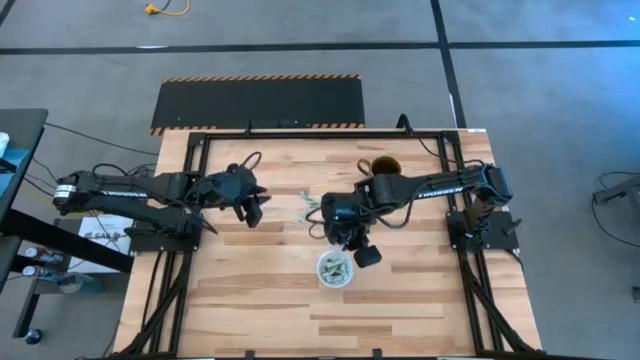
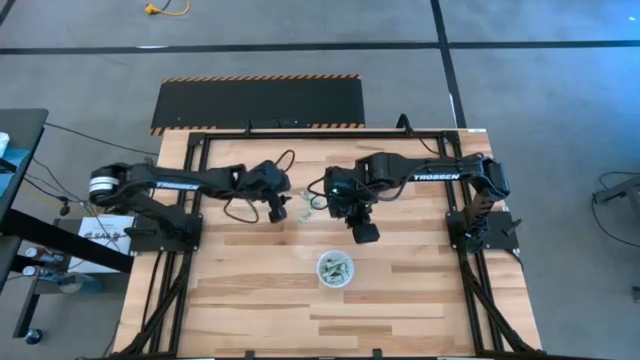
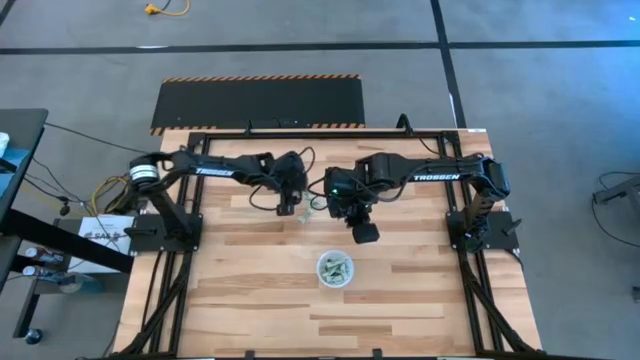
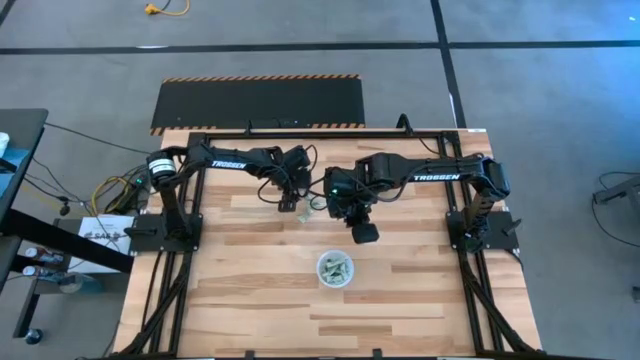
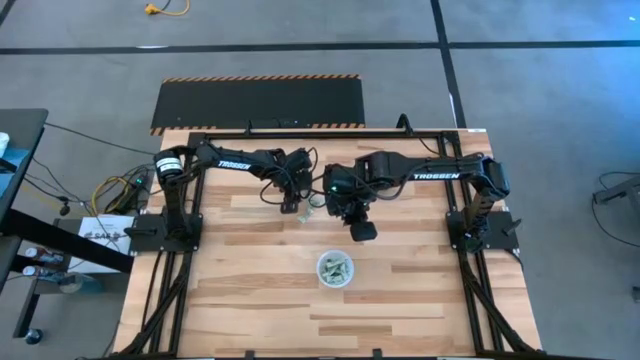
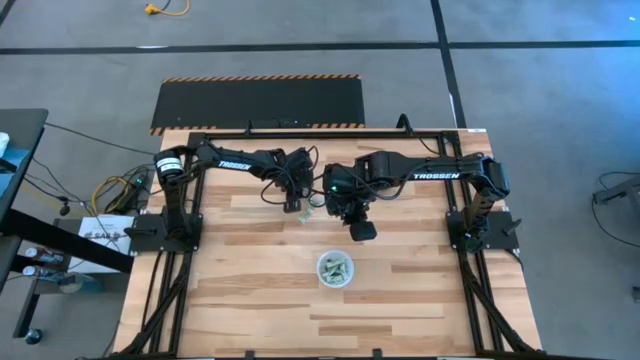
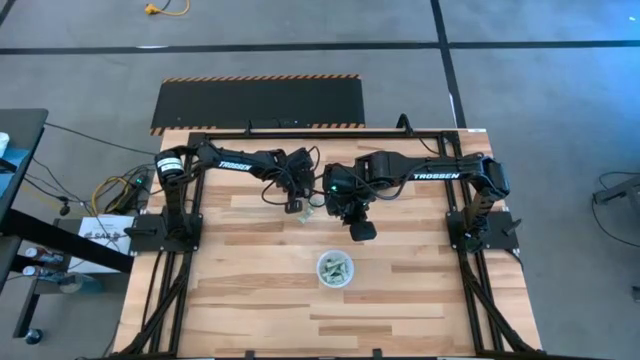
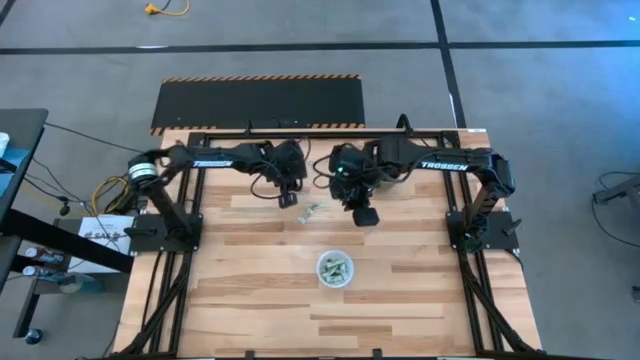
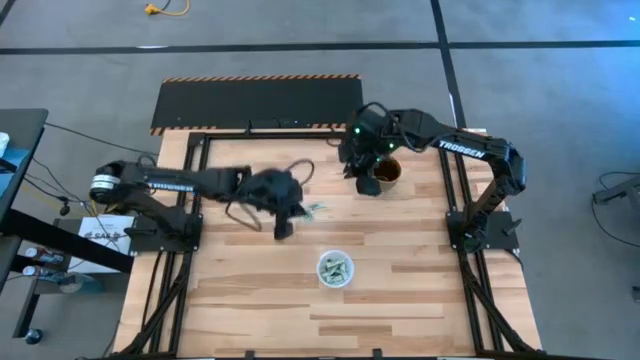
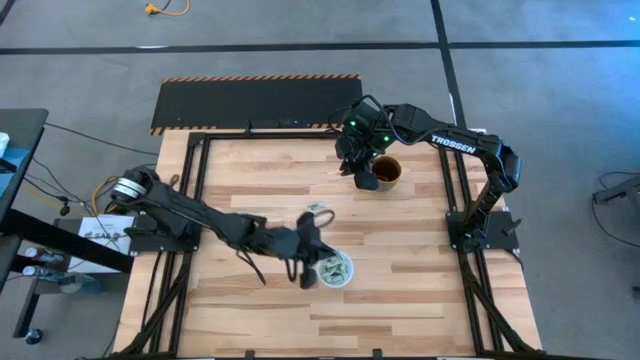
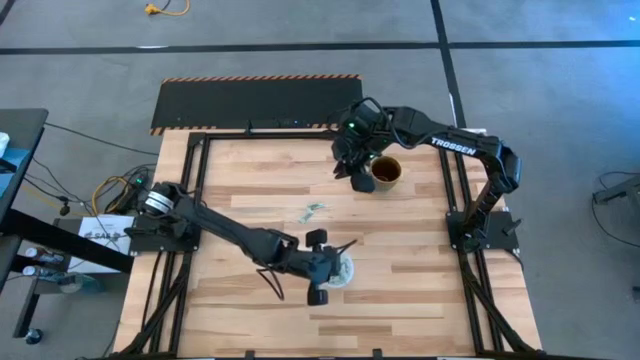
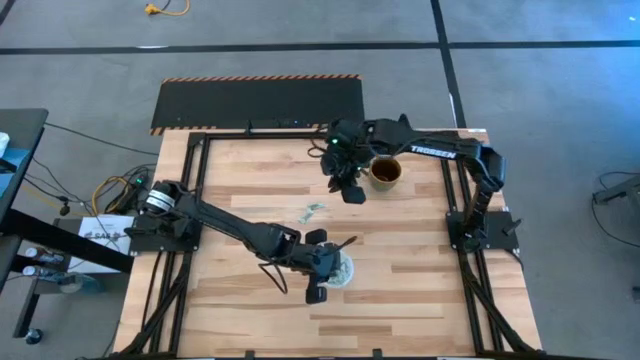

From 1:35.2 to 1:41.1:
Task: Pick and place Stevia / Truvia into bins
Put the green stevia packet into the transparent container

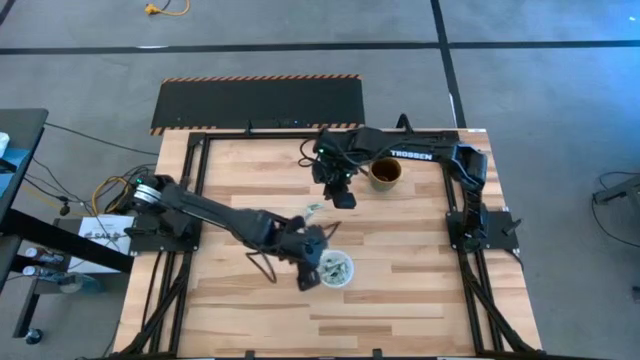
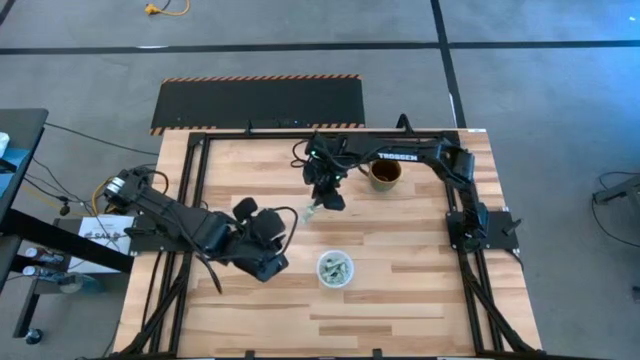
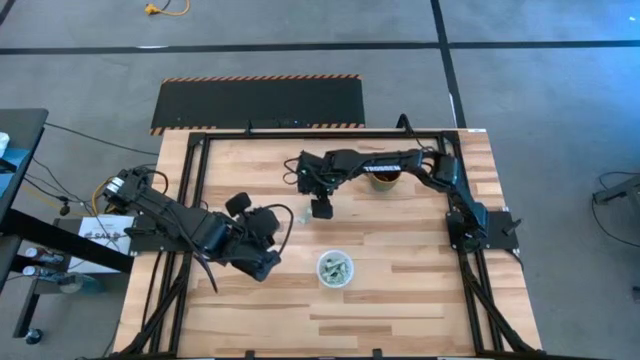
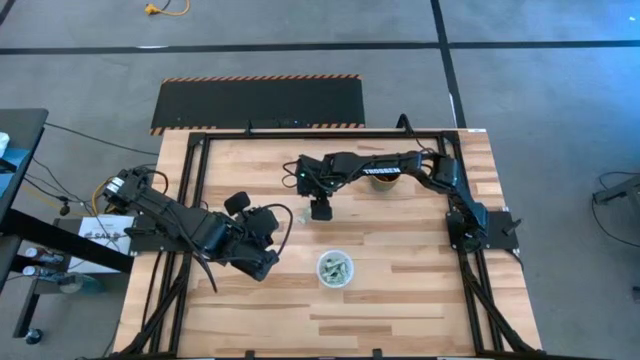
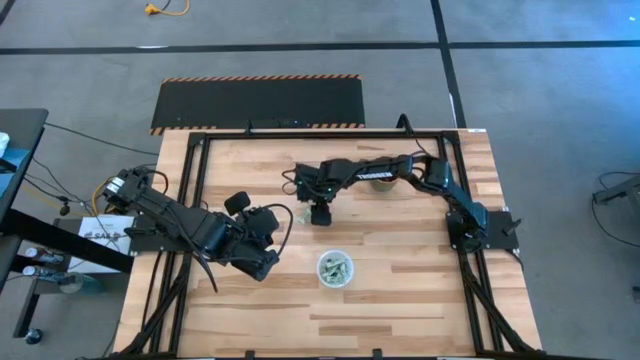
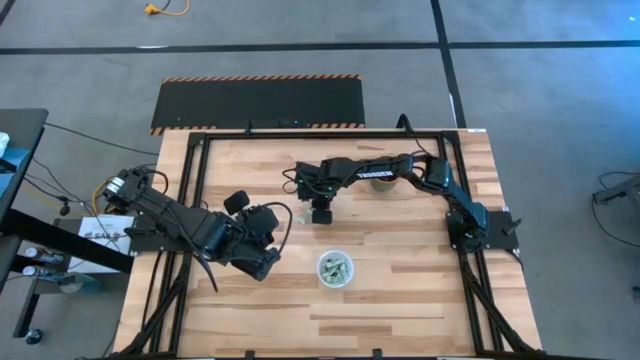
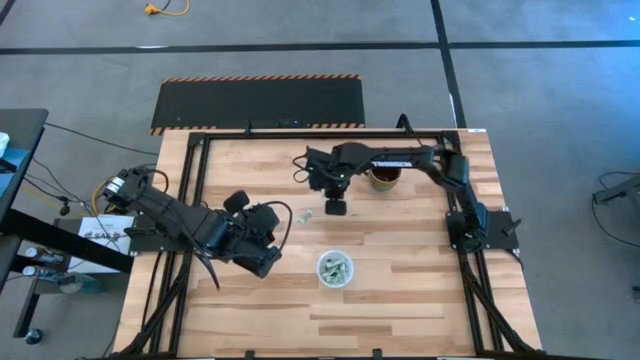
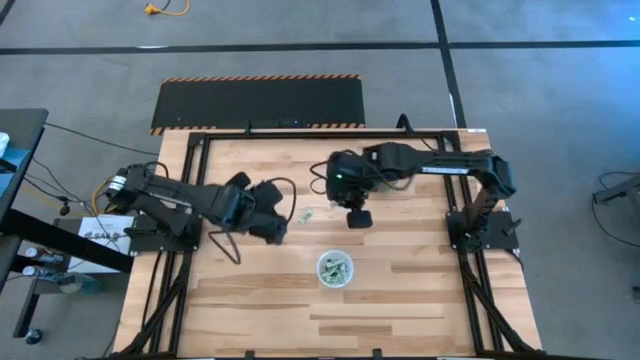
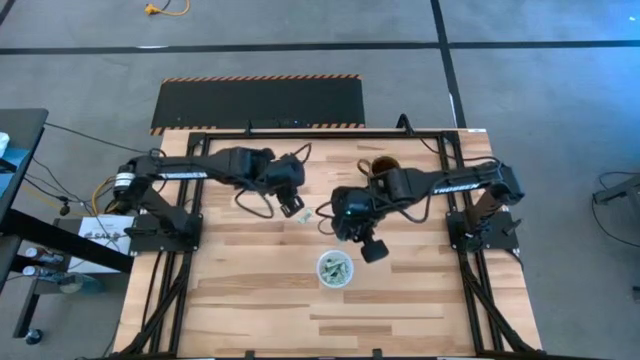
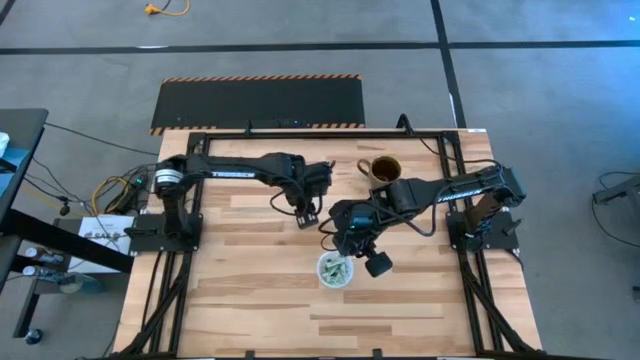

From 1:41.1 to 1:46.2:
Put the green stevia packet into the transparent container

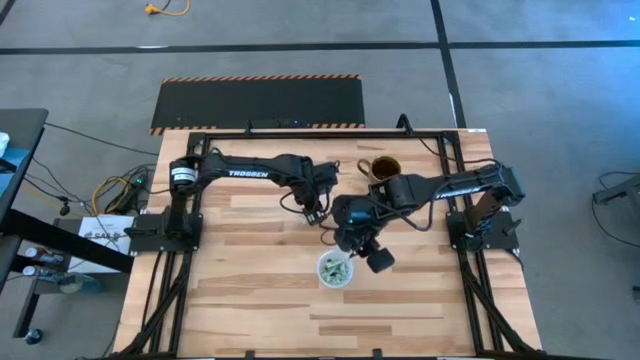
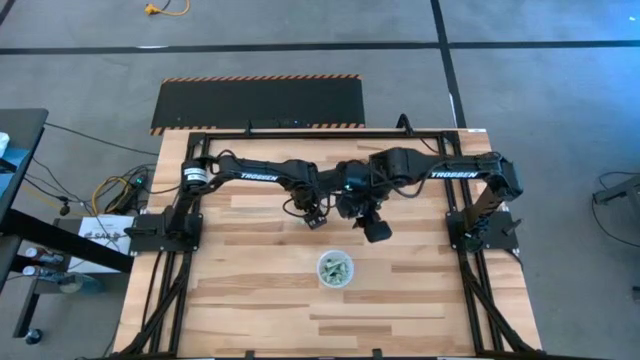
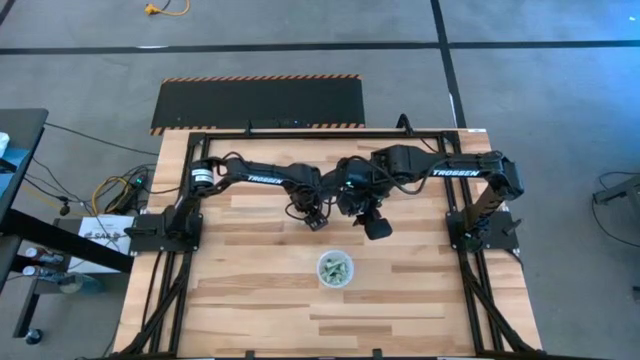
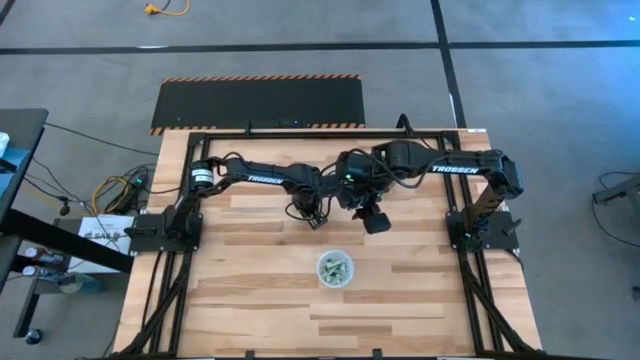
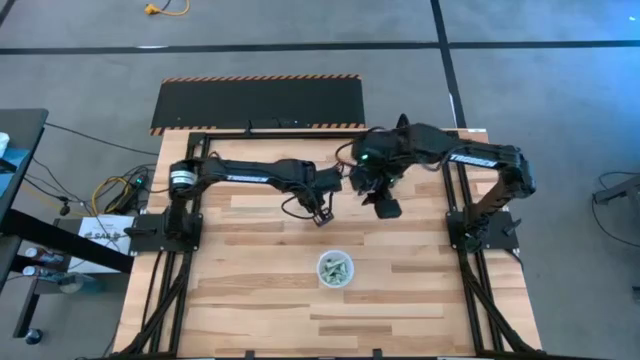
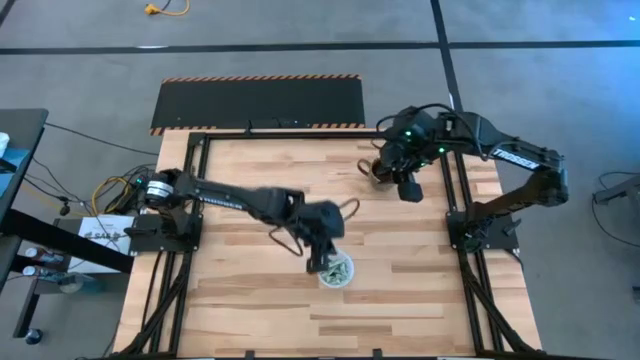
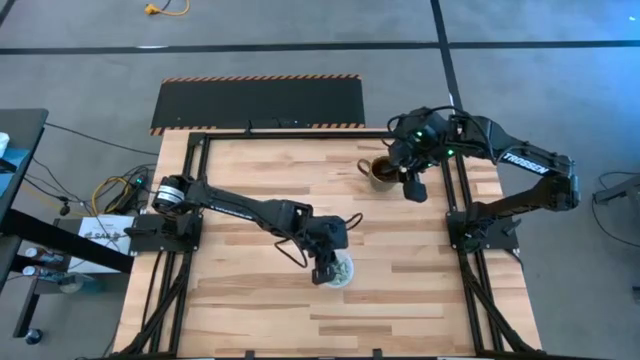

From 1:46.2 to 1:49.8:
Put the green stevia packet into the transparent container

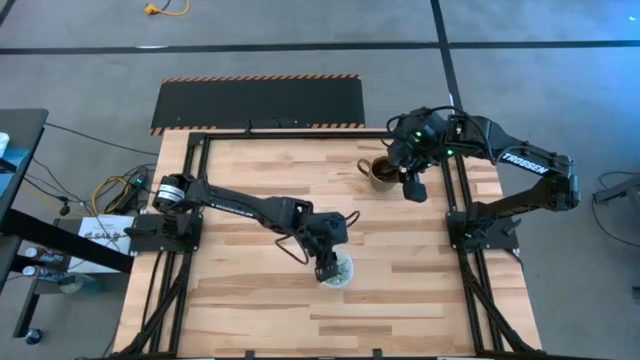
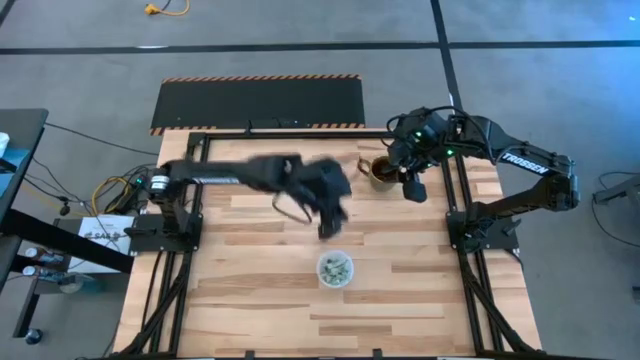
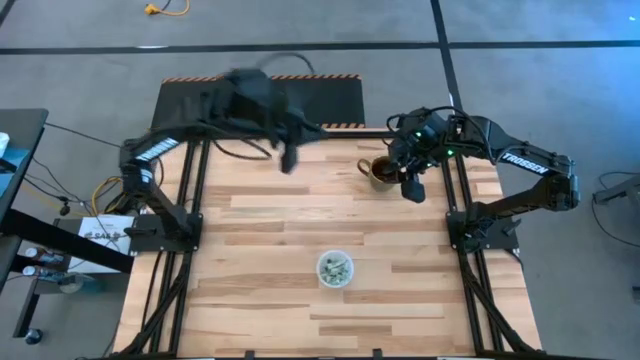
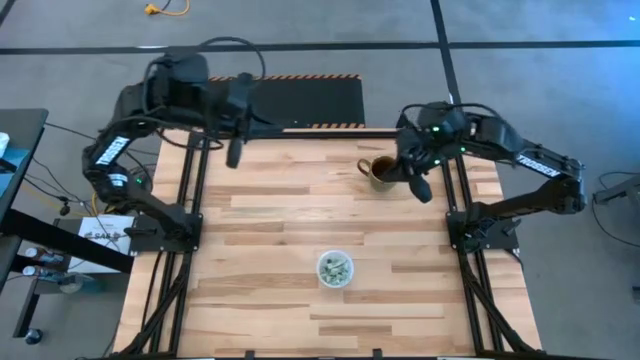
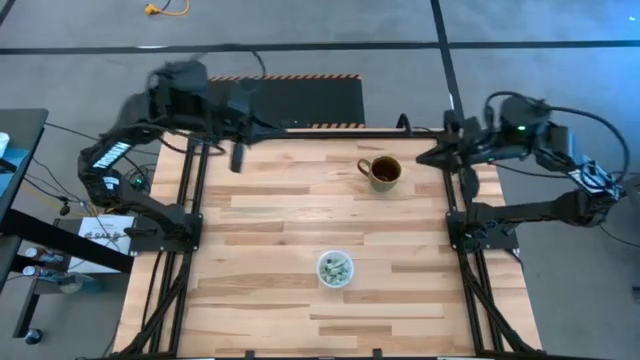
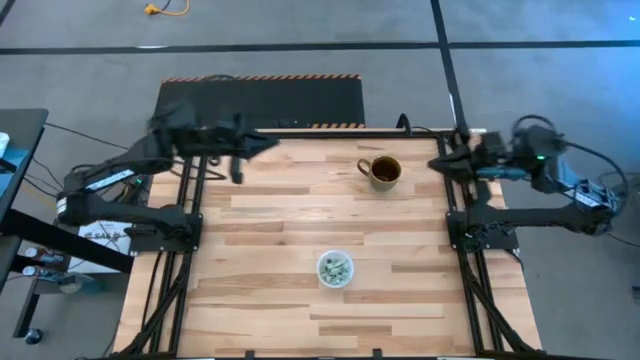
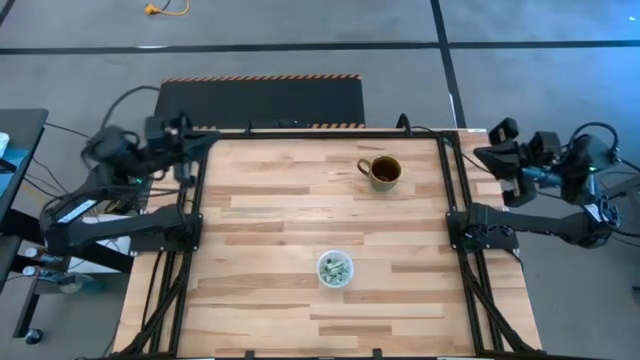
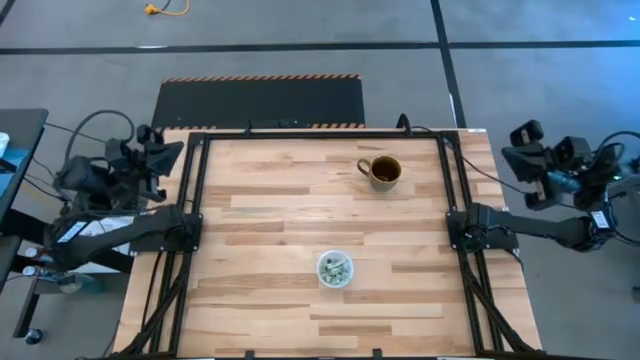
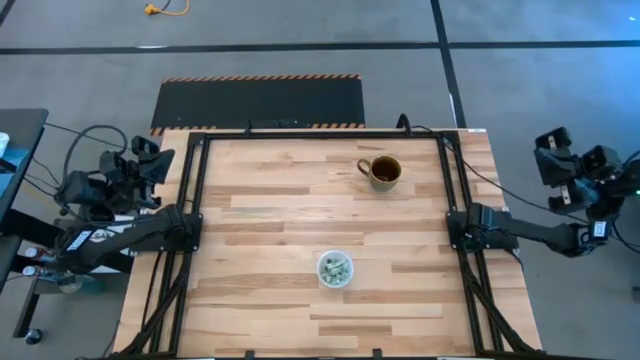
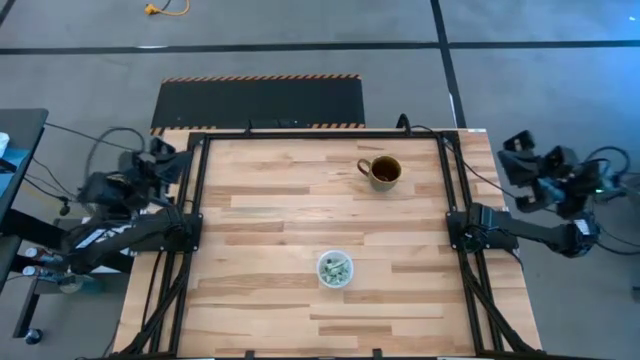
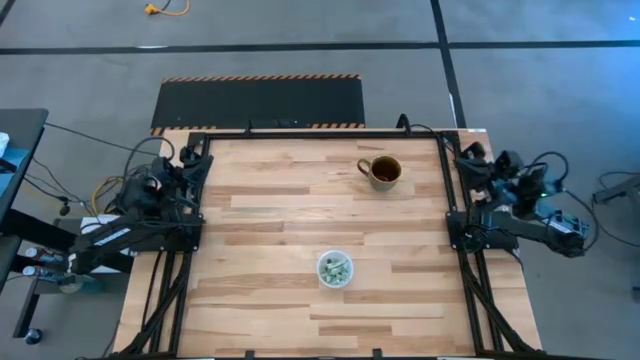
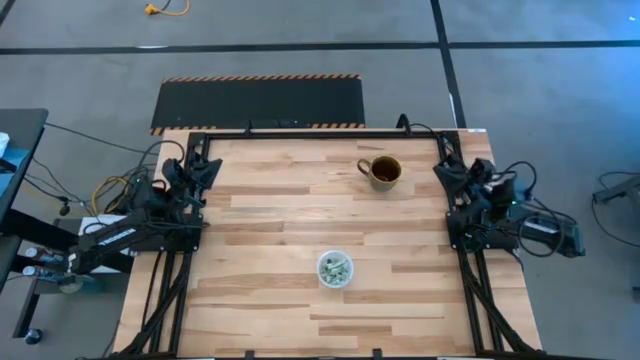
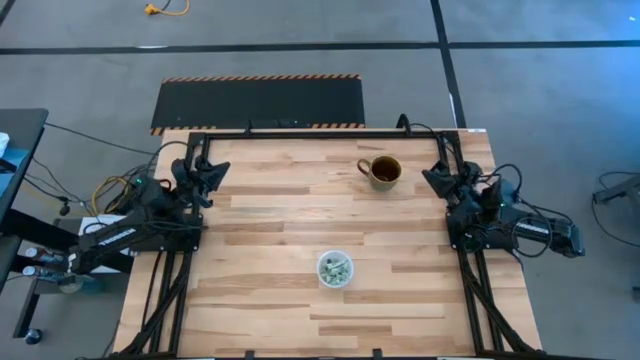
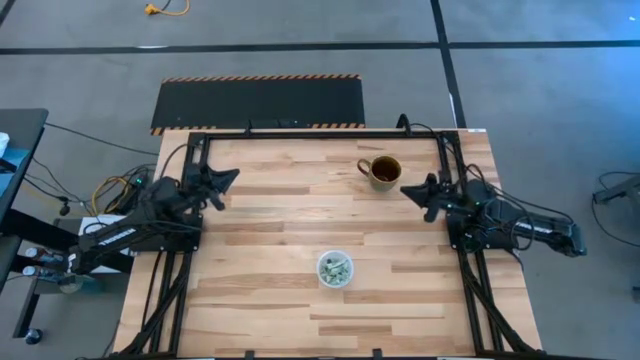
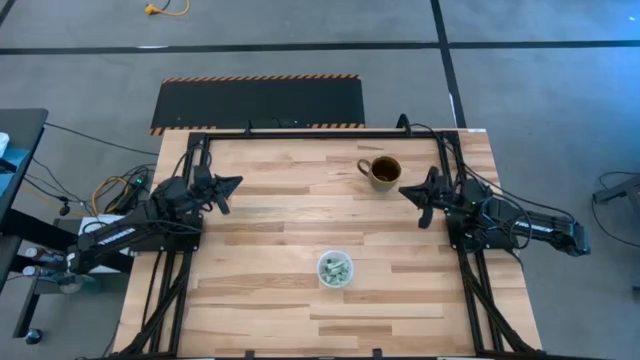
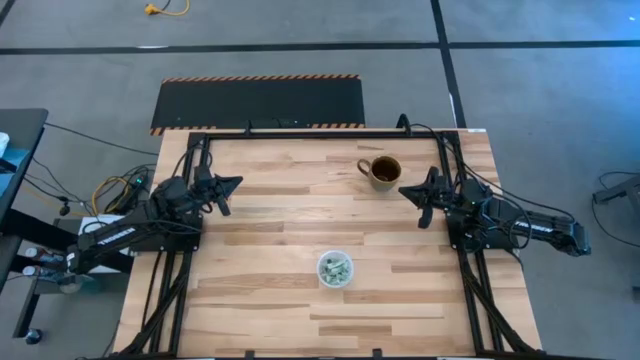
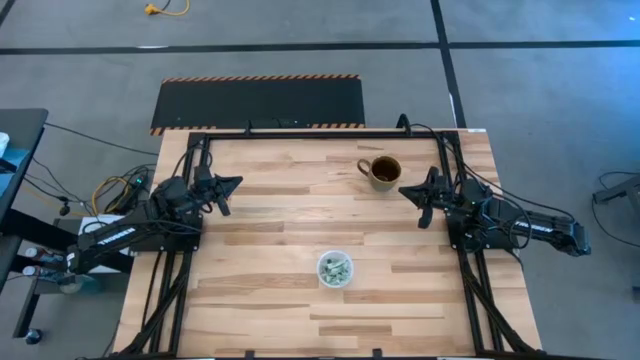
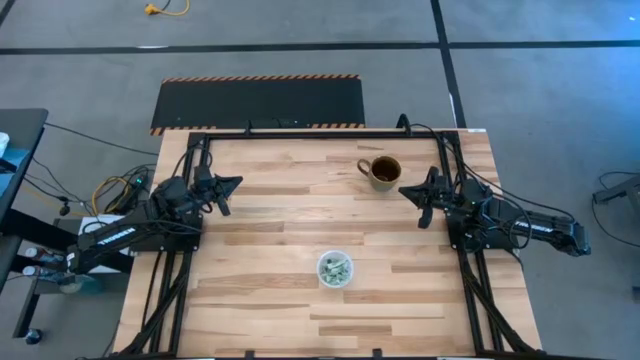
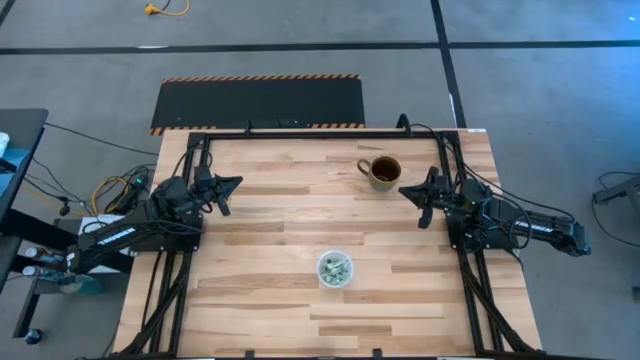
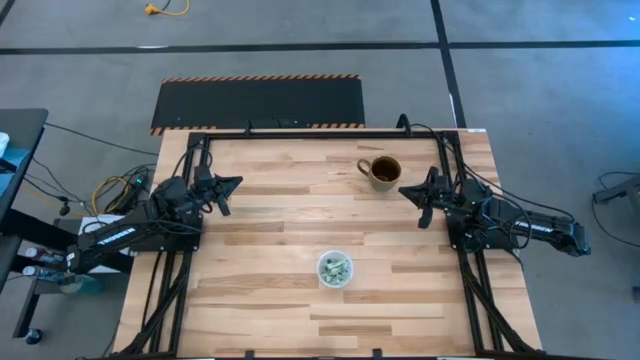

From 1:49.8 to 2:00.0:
Return to Home Position
